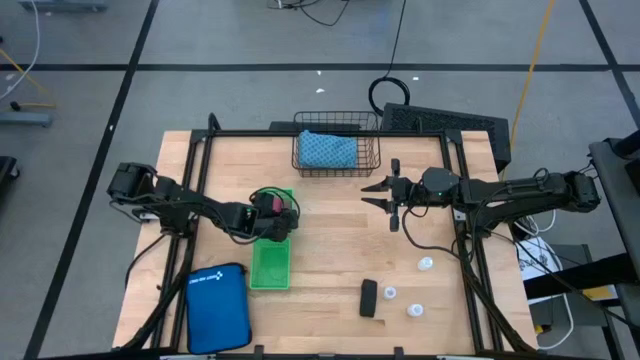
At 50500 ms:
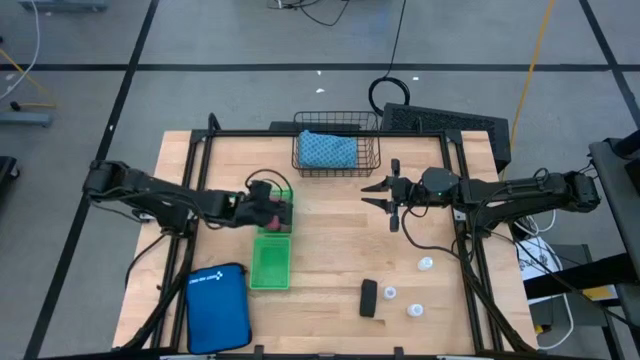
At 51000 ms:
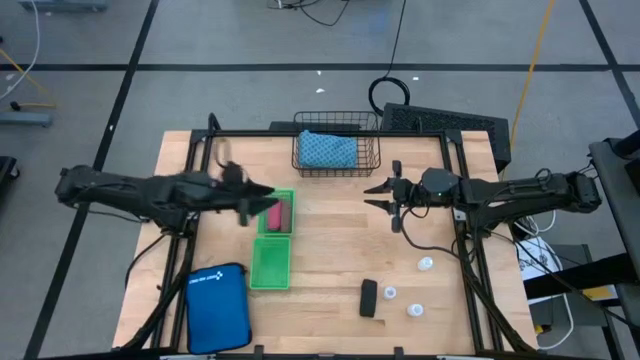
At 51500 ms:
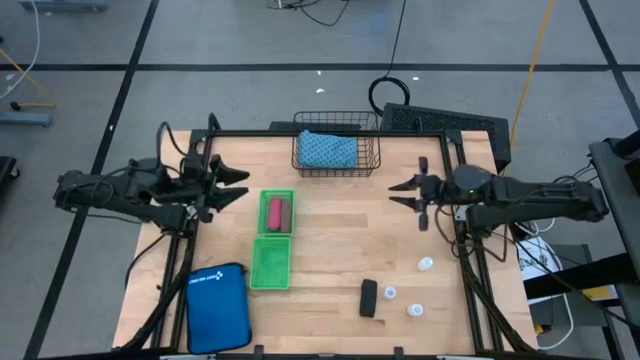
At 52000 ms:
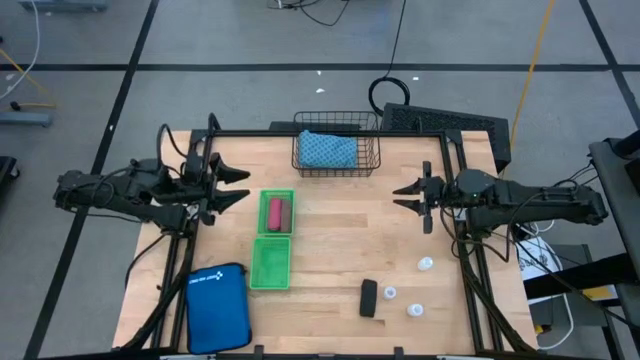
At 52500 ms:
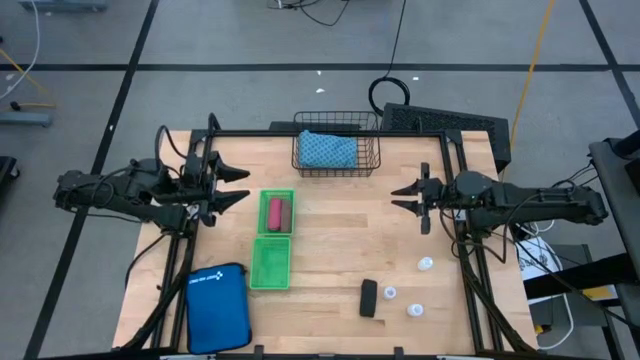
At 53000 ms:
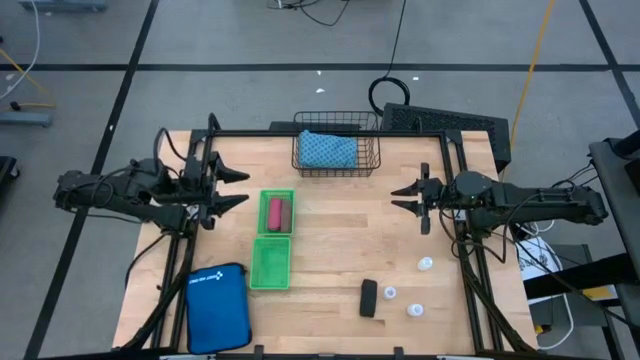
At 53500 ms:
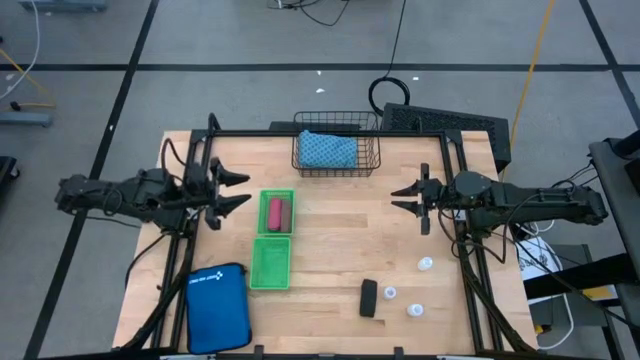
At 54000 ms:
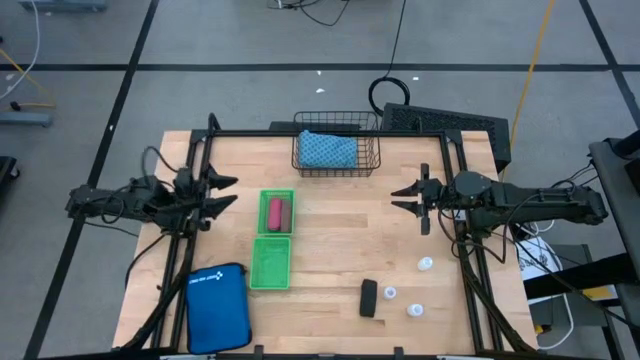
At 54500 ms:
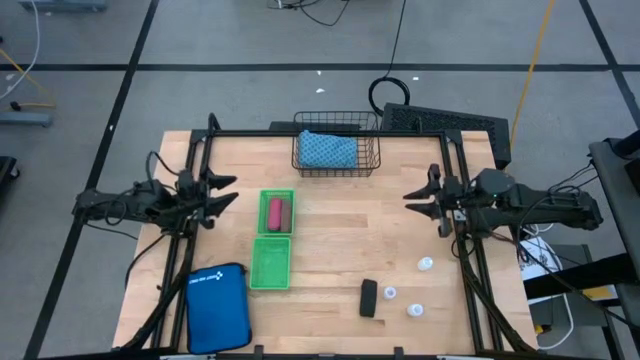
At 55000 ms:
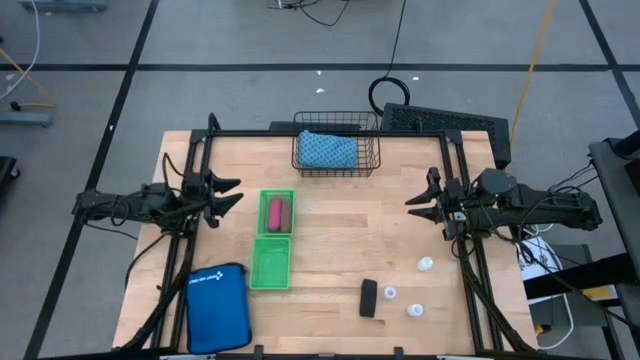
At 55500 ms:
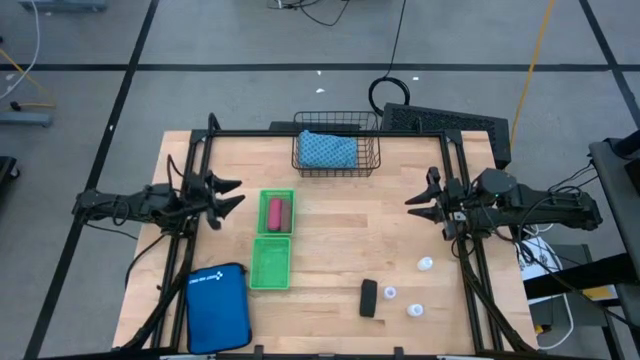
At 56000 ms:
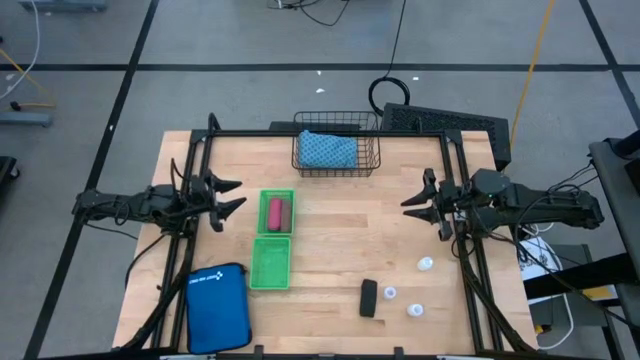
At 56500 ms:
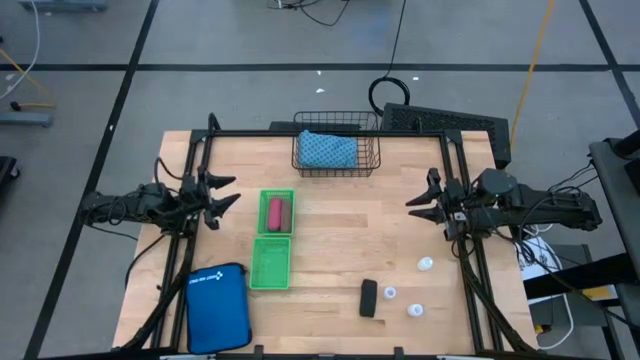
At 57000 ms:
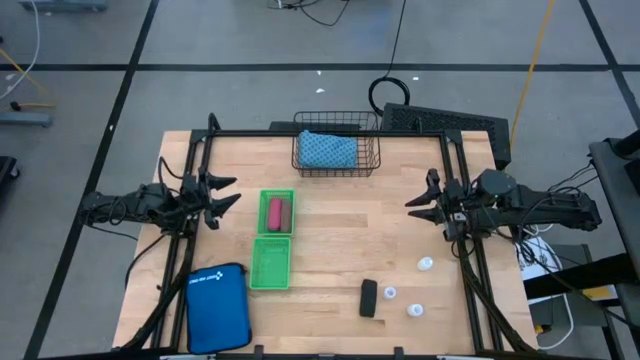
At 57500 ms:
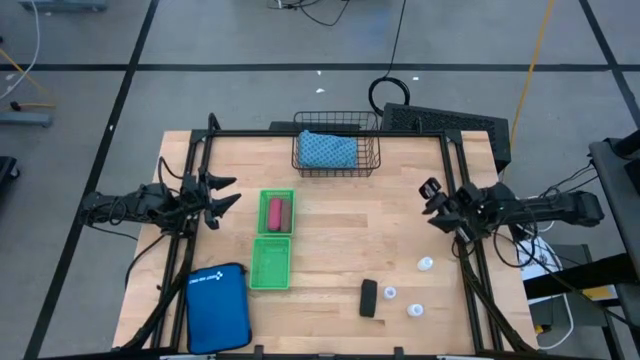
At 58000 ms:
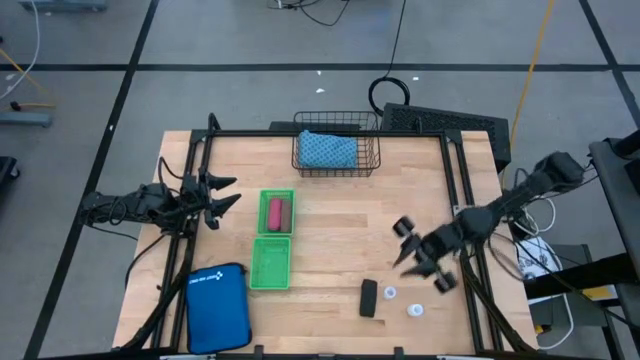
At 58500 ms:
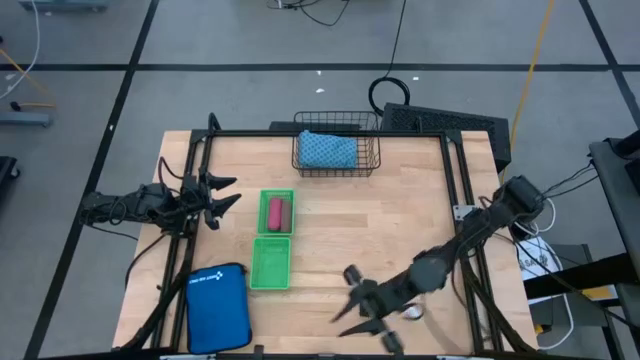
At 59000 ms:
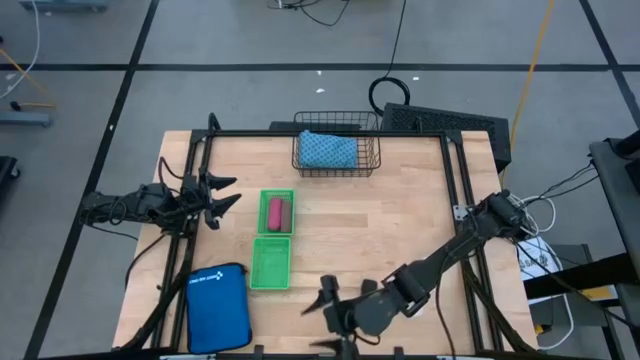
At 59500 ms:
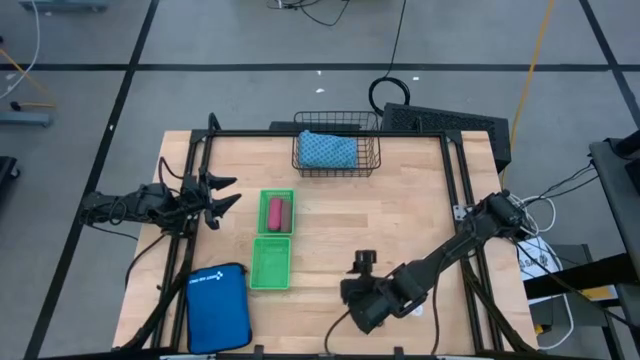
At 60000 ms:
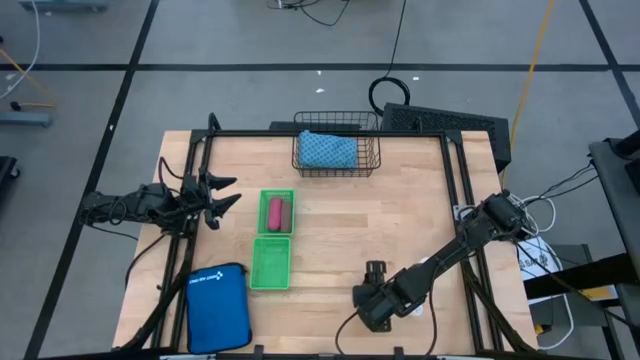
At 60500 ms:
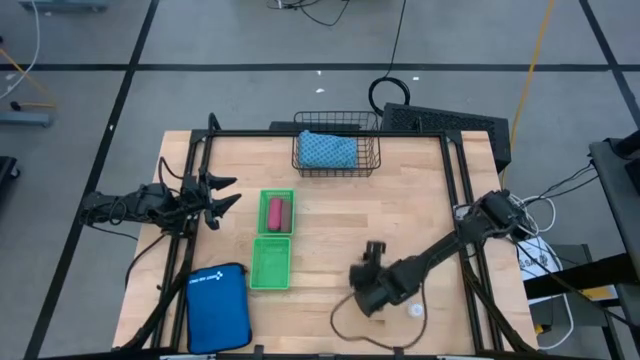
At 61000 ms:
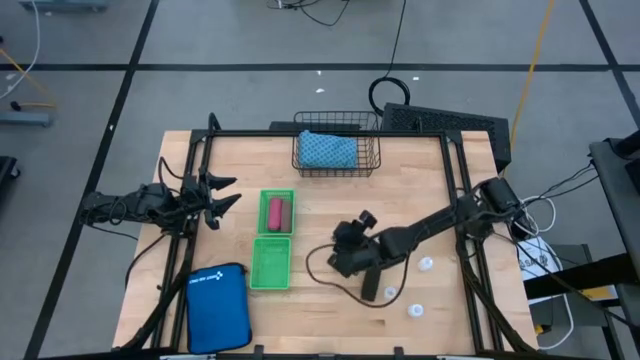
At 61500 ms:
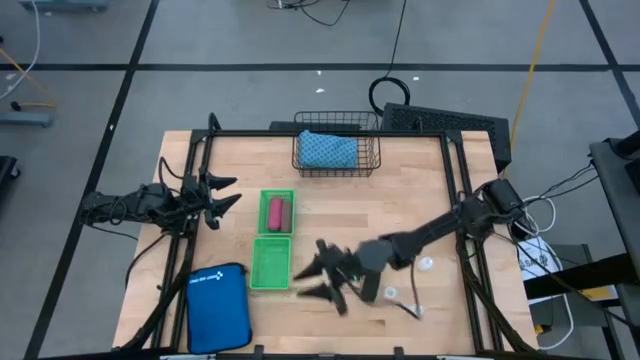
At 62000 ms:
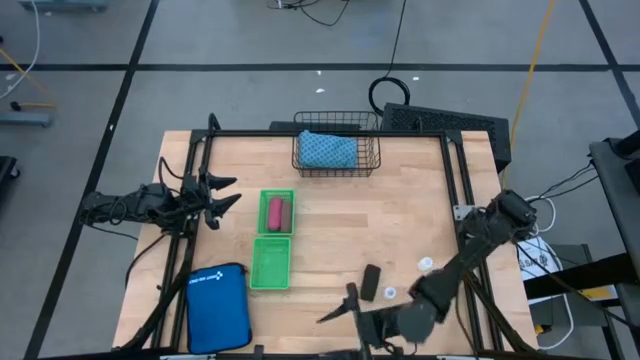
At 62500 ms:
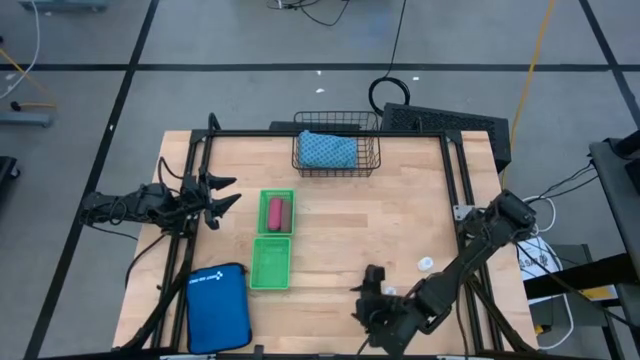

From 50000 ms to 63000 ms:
Task: Pick & Place Medicine items
Put the black bandage into the top green bin

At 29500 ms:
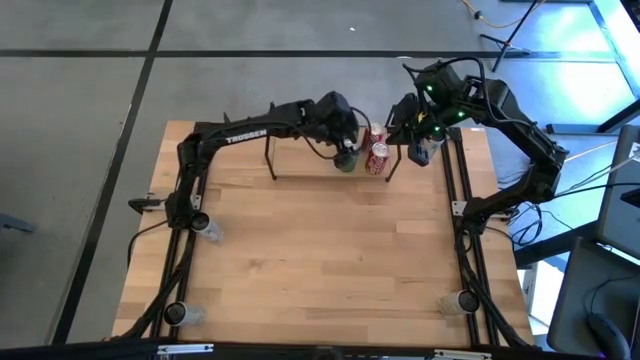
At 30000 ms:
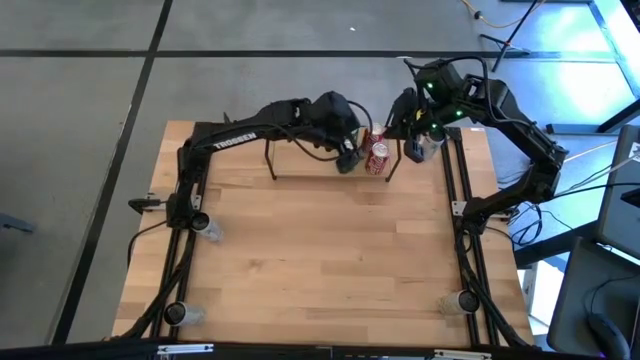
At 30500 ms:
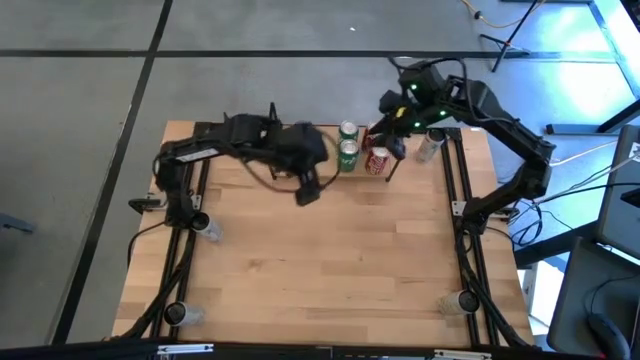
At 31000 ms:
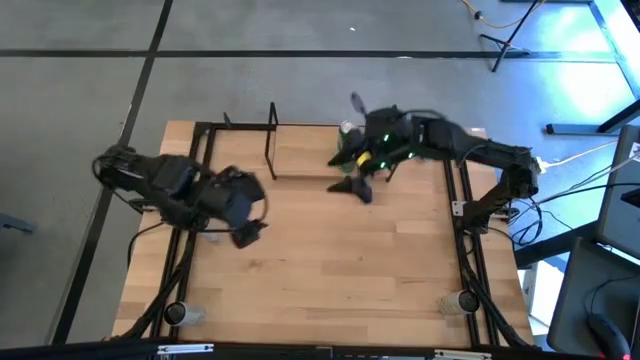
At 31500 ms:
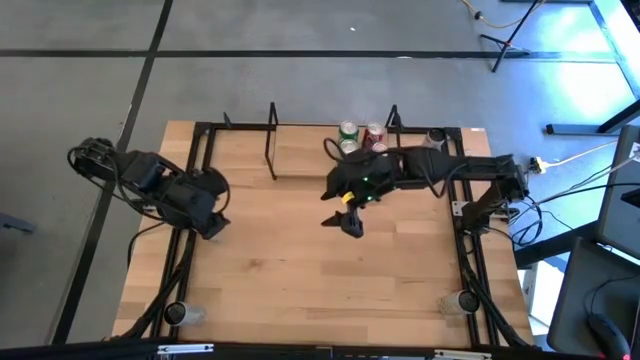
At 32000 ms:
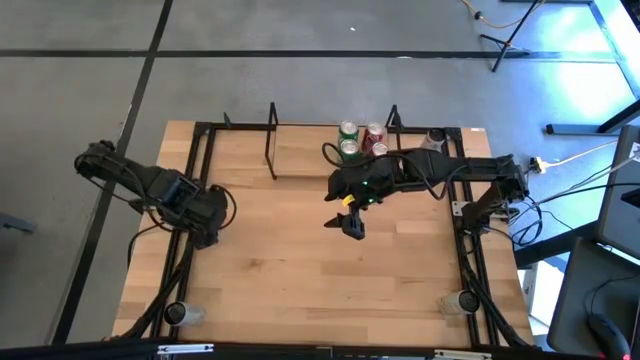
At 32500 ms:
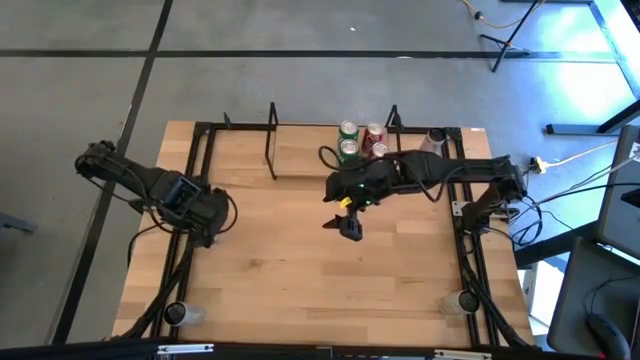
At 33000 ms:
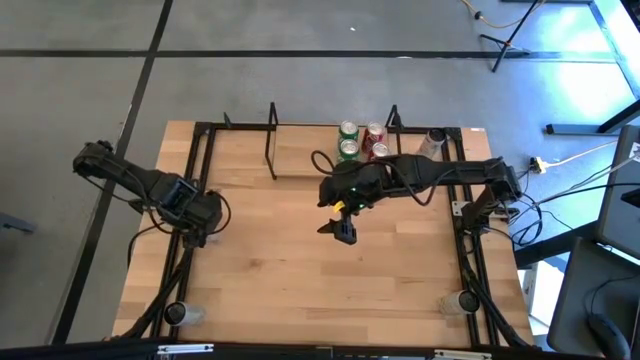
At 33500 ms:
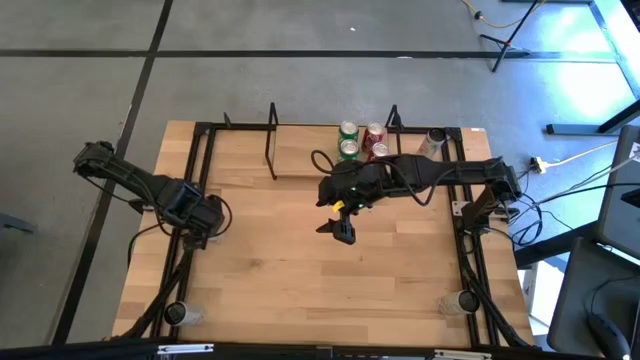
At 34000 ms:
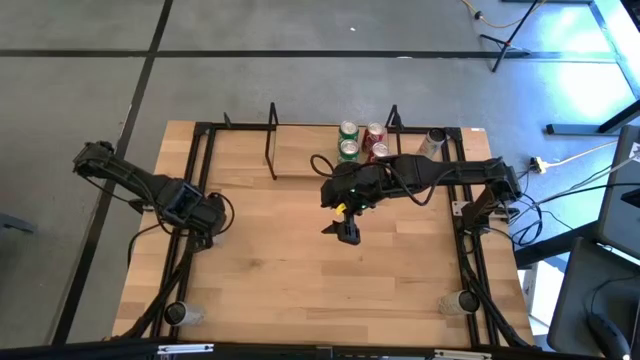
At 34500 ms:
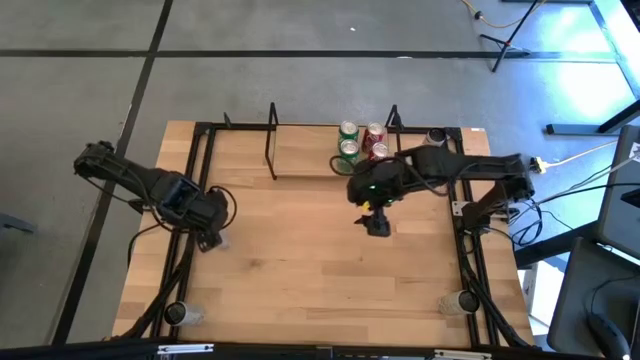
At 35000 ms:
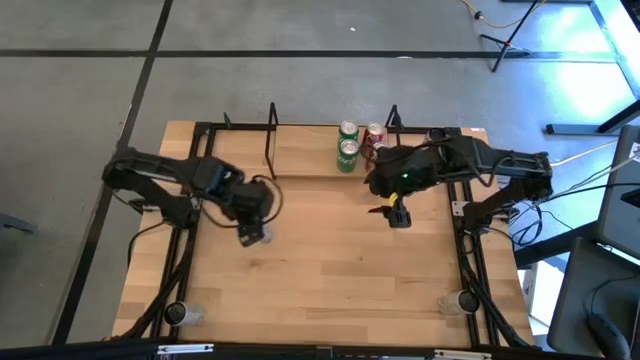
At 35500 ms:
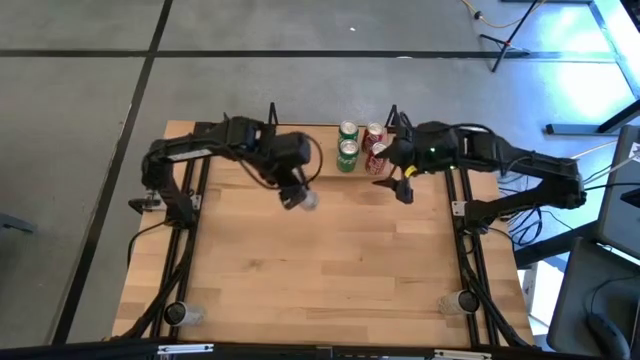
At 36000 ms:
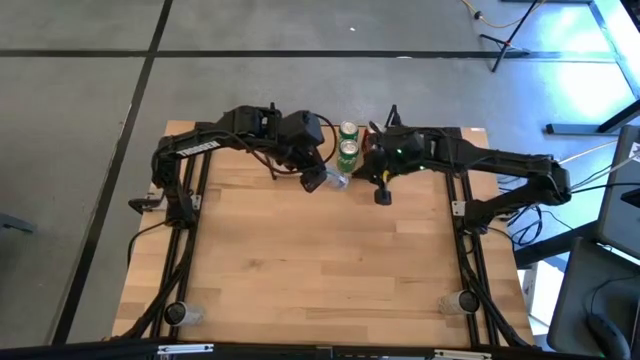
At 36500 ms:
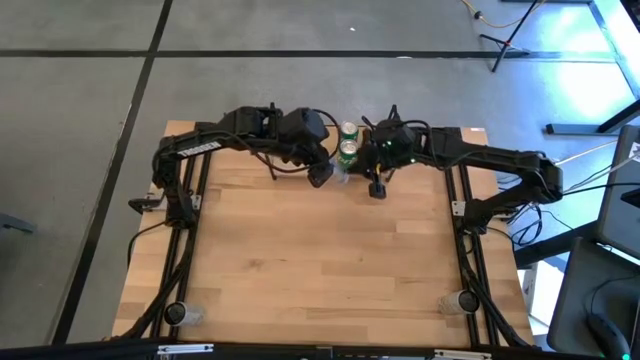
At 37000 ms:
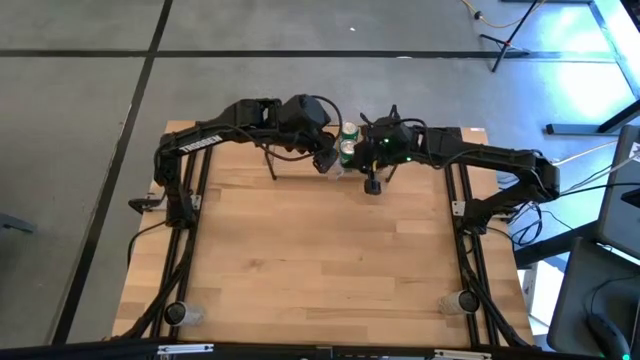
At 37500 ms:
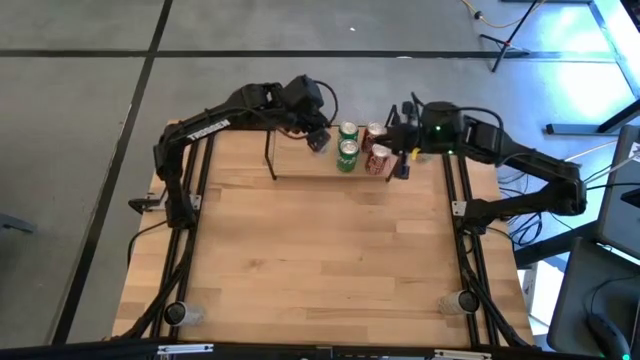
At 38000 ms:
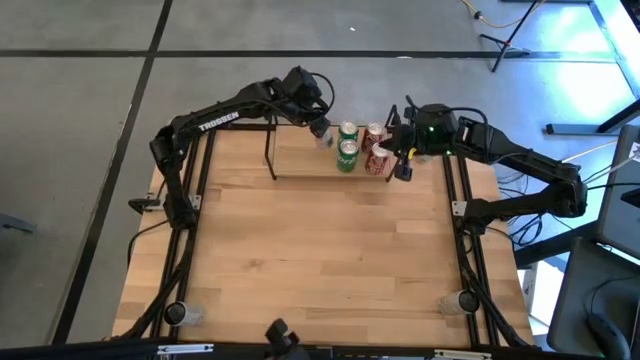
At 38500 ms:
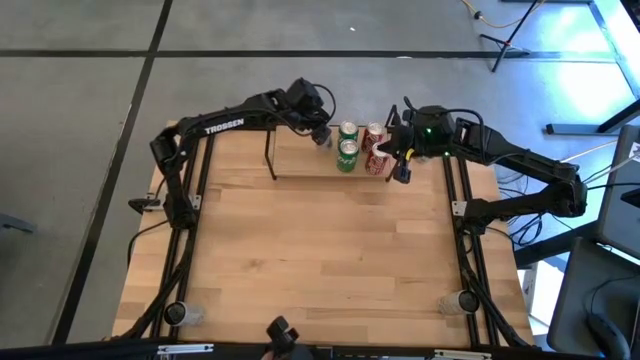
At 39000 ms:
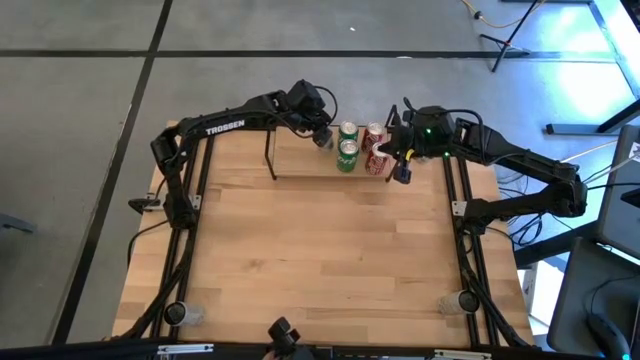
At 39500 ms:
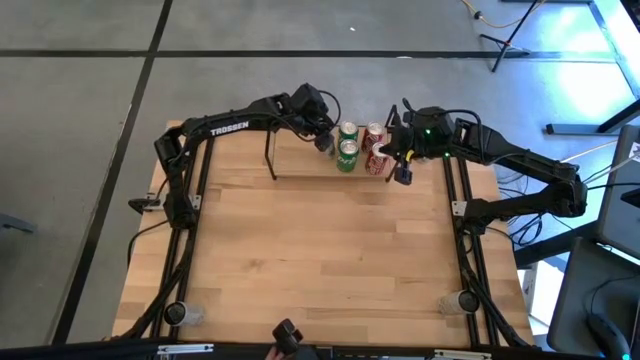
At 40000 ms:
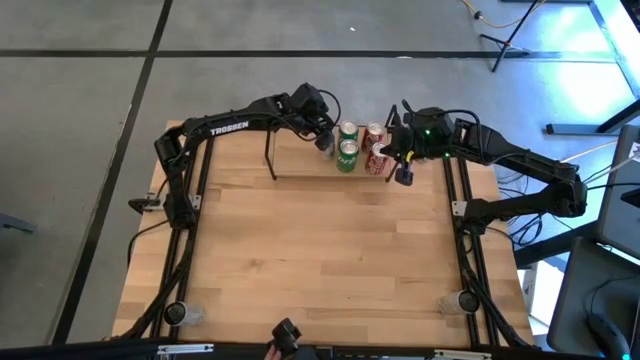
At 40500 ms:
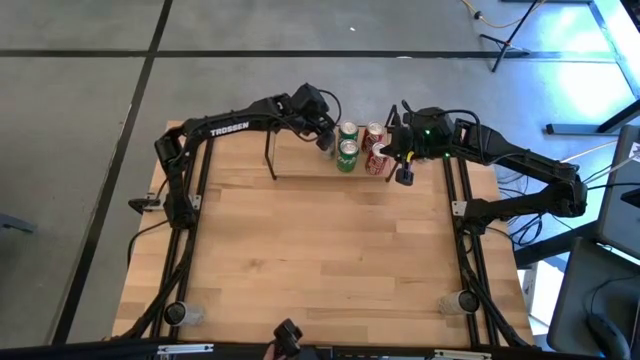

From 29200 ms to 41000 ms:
Task: Place canned beverage on shelf
Put the bottom white pink soda can on the shelf
